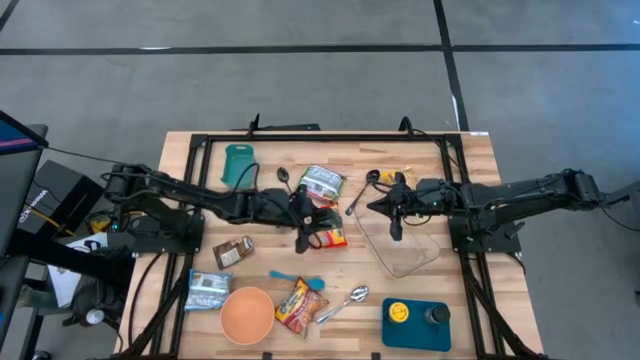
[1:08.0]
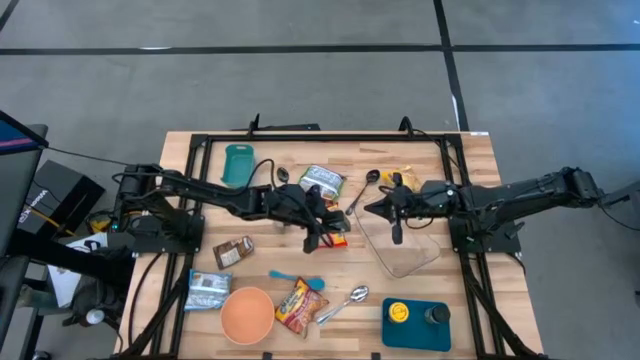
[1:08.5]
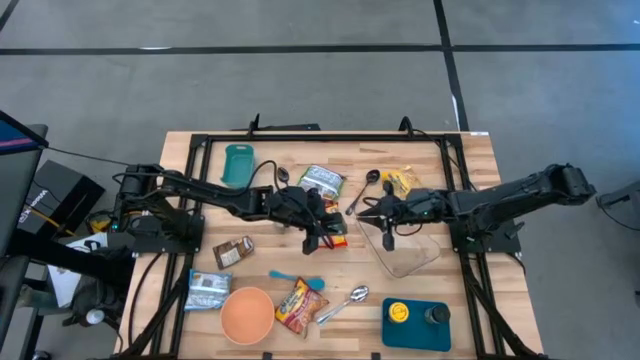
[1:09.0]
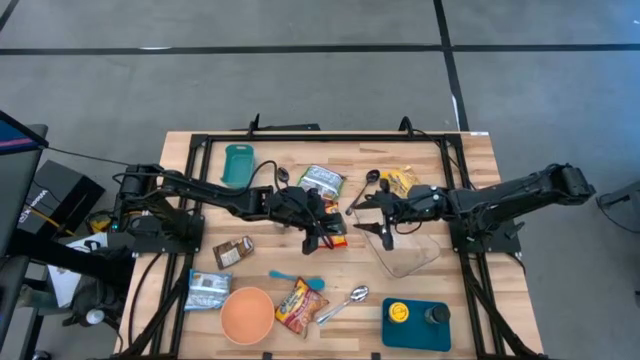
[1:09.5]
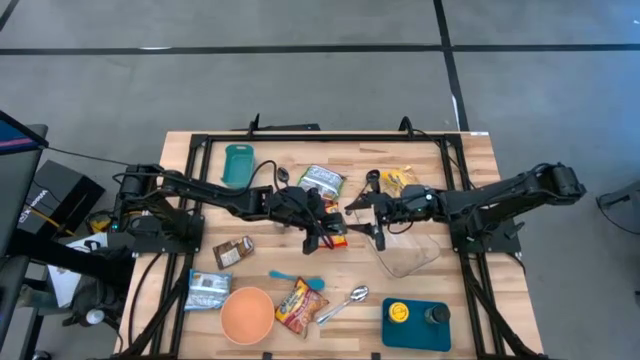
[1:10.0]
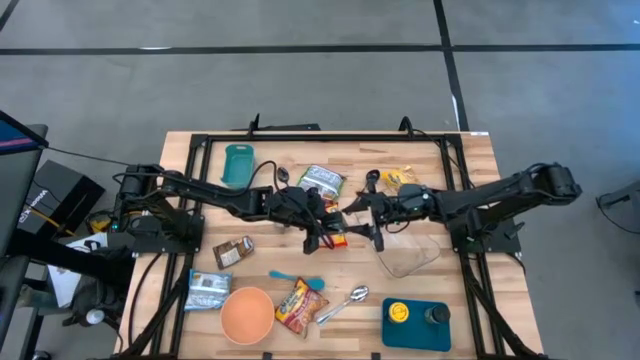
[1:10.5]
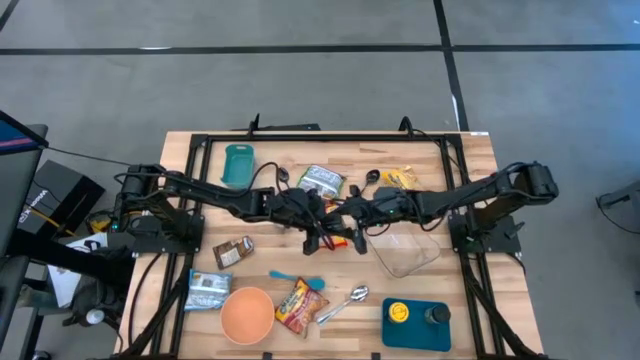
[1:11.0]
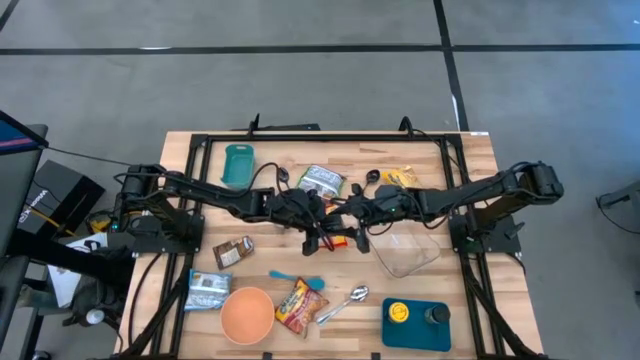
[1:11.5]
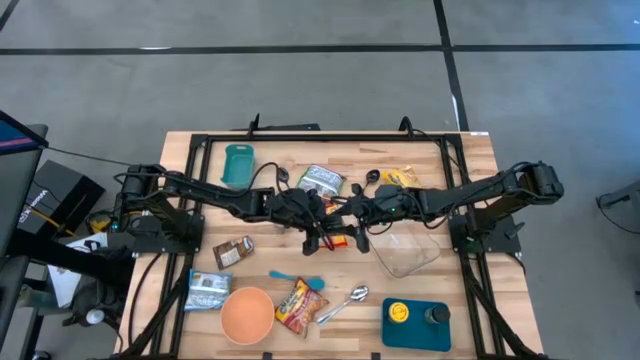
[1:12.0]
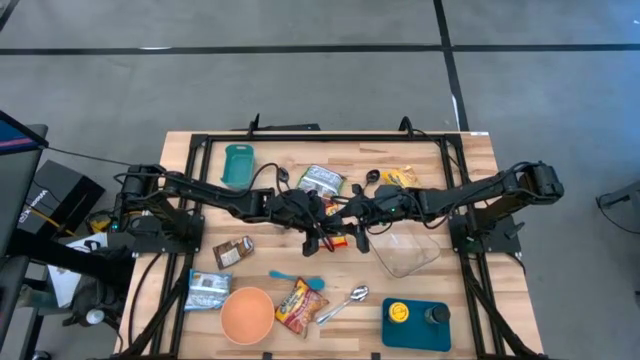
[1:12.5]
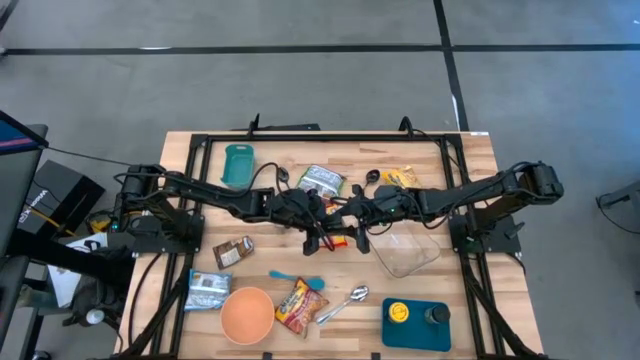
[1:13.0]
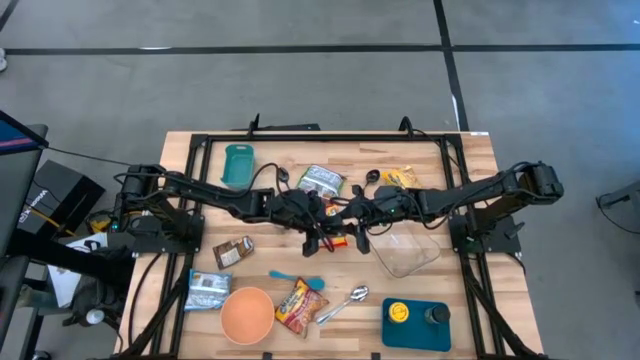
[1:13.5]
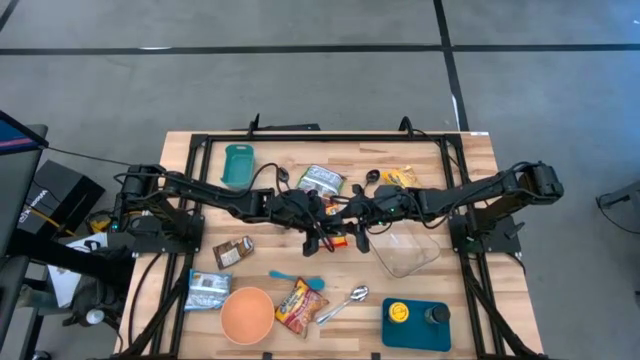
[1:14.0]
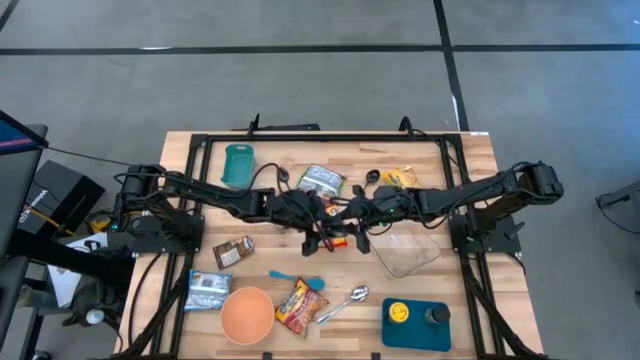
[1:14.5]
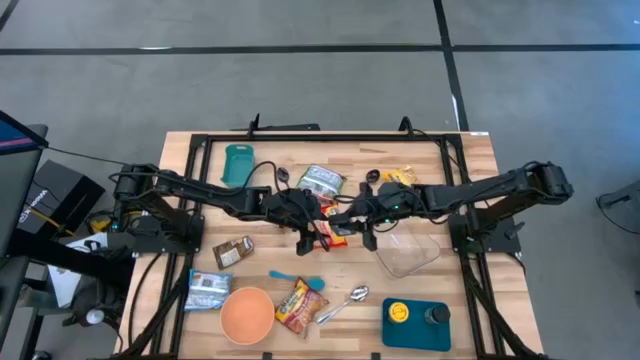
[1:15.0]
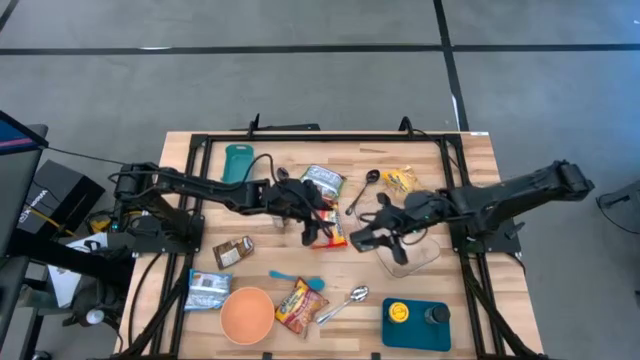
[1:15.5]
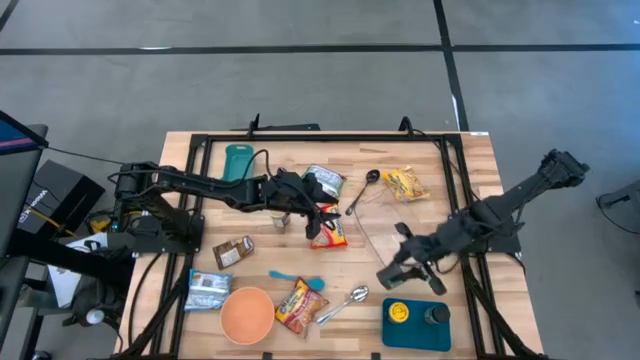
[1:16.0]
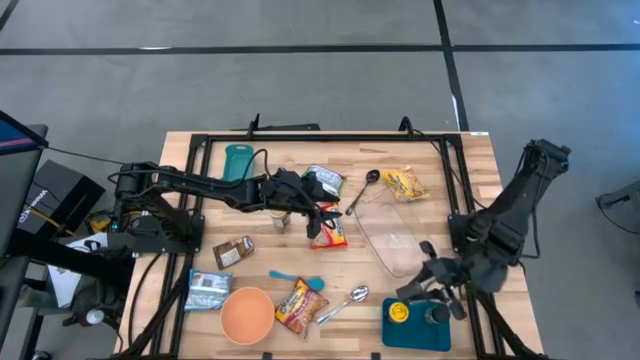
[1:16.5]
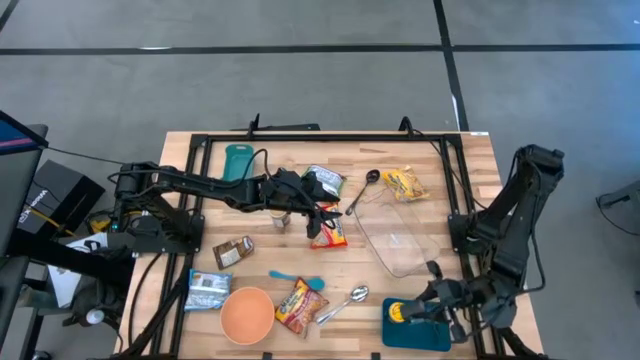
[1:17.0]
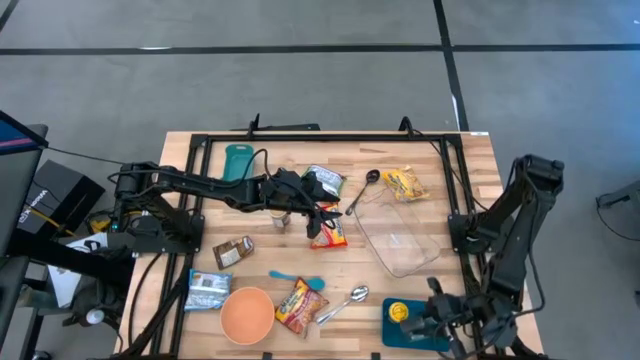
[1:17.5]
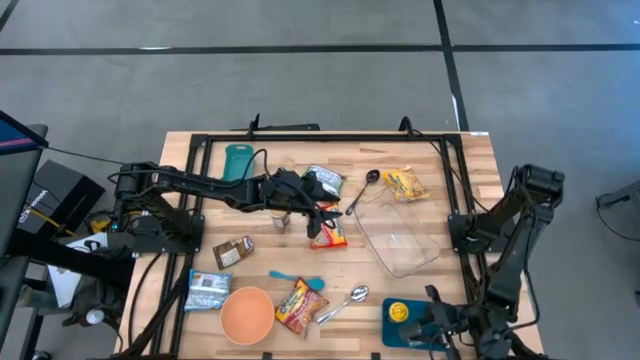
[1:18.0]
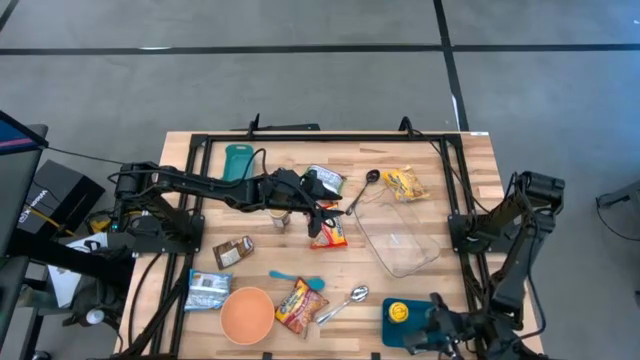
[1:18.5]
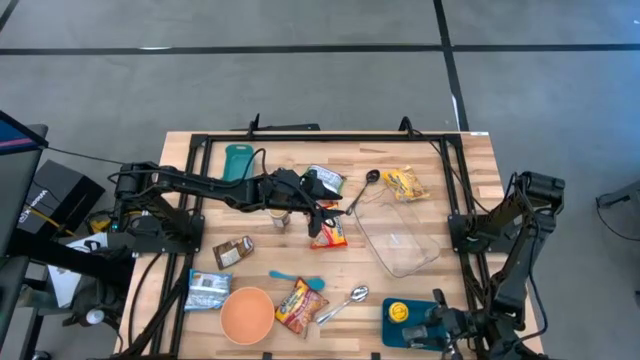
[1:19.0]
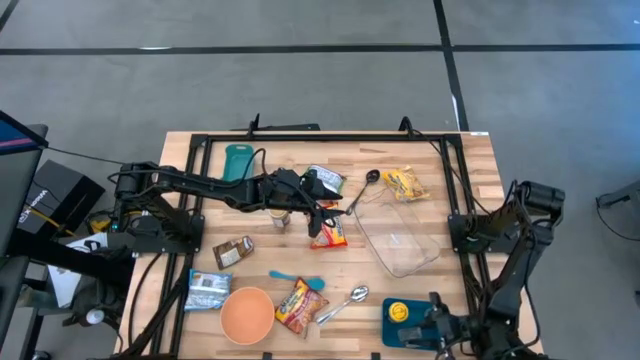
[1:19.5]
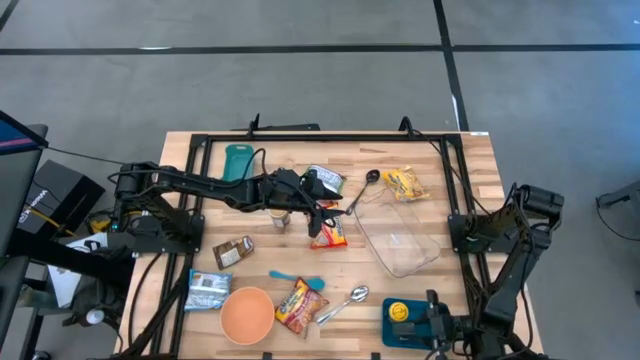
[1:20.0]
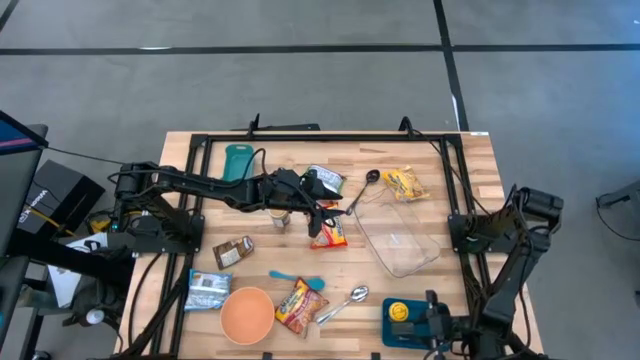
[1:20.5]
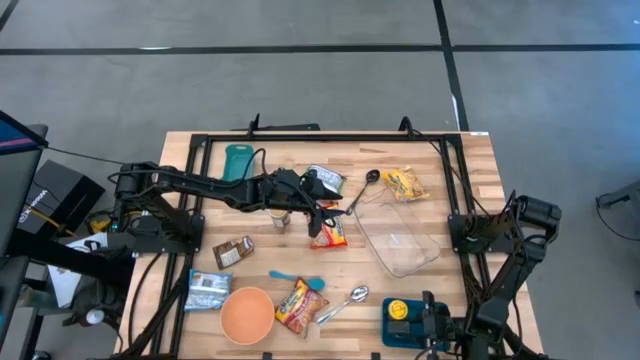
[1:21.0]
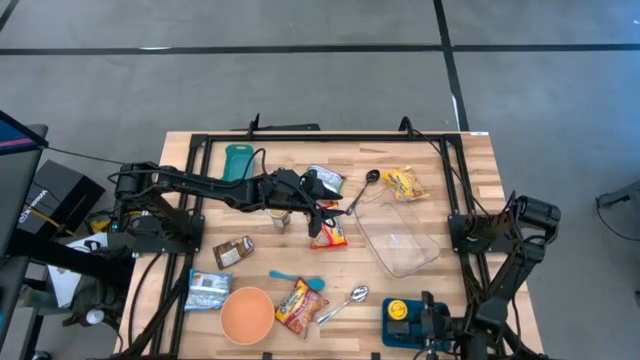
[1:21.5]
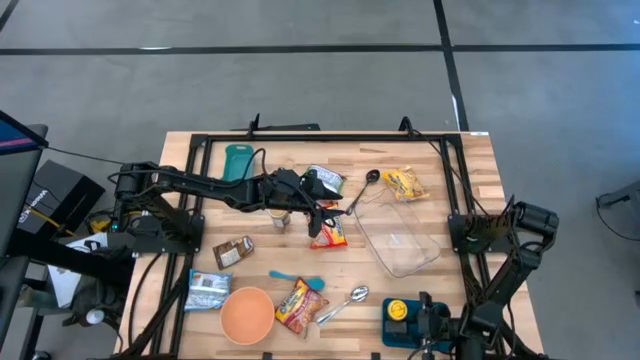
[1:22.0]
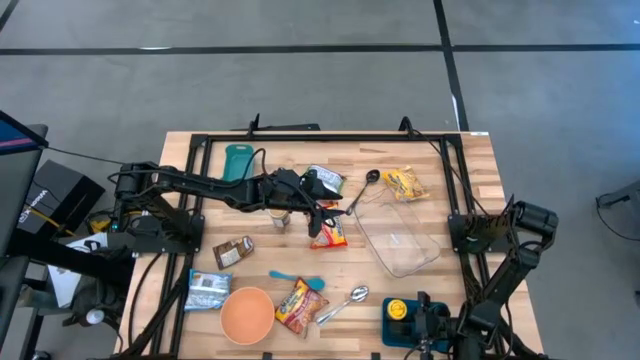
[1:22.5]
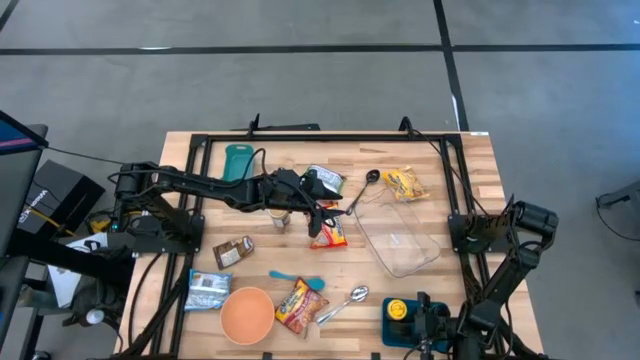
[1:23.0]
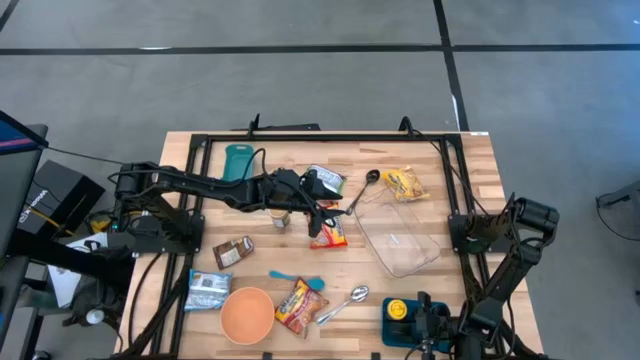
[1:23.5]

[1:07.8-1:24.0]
Task: Pick & Place Food Item
Put the black spice can into the blue bin

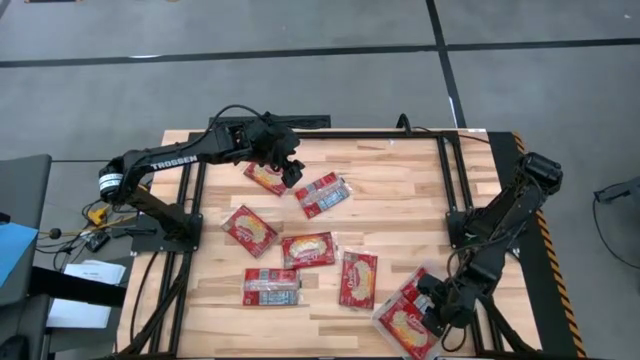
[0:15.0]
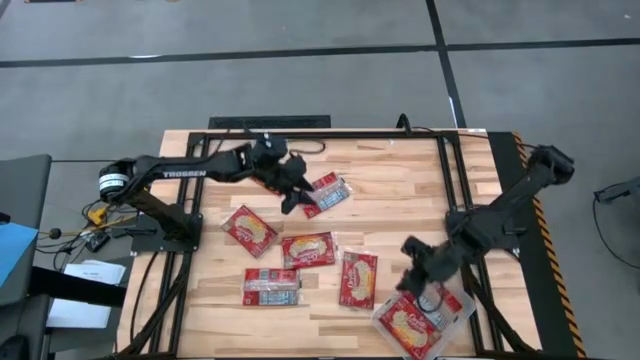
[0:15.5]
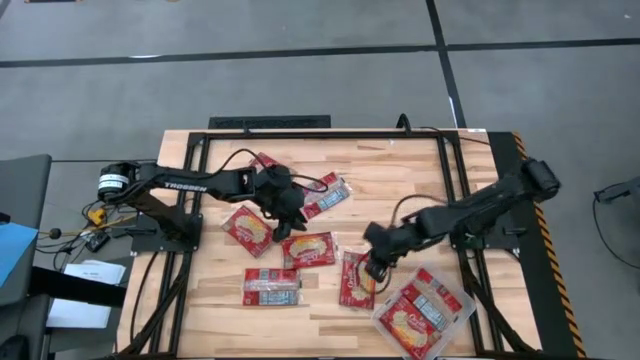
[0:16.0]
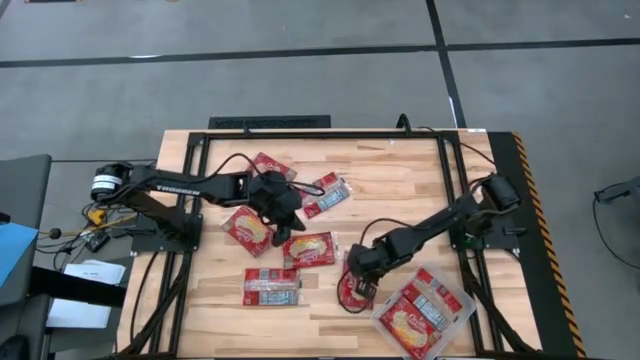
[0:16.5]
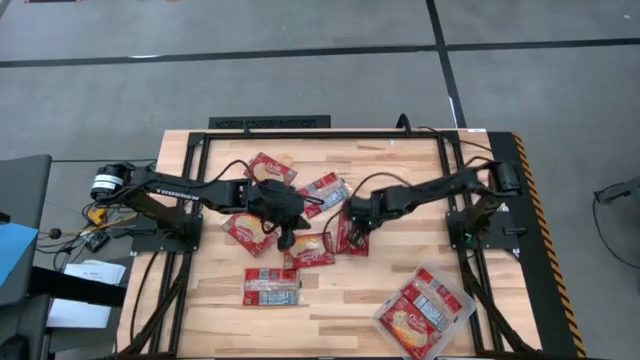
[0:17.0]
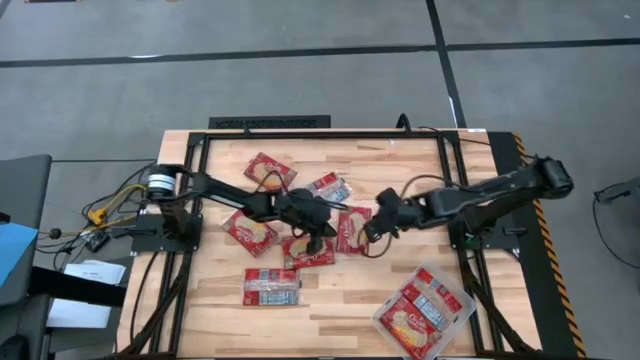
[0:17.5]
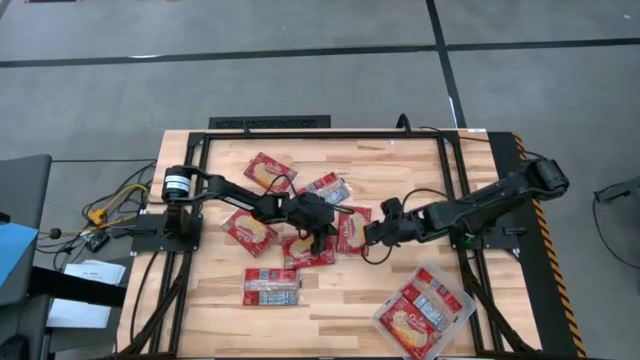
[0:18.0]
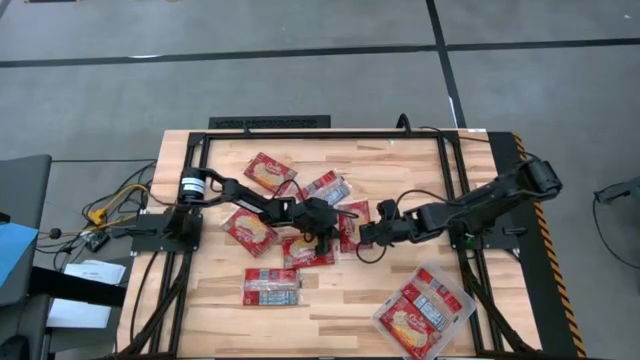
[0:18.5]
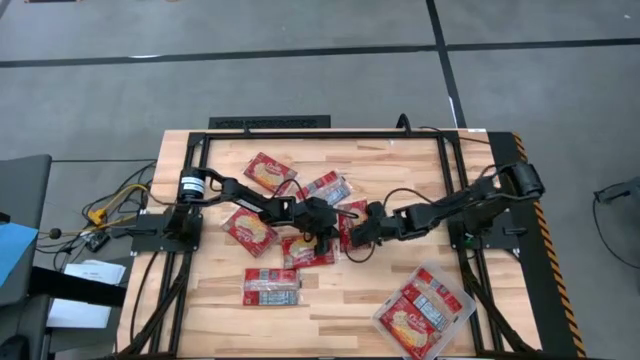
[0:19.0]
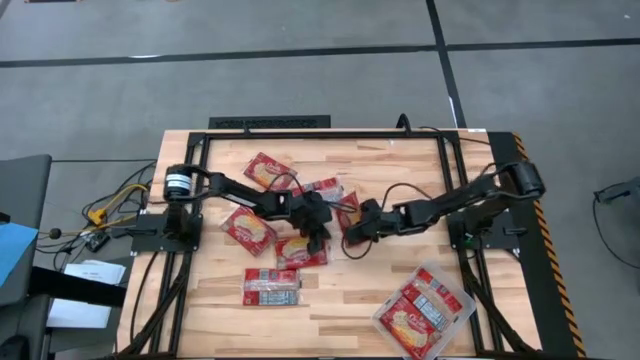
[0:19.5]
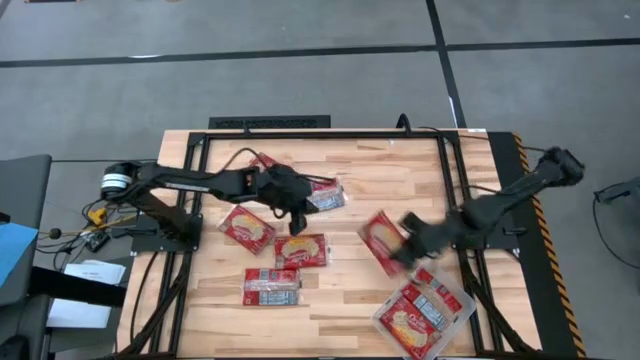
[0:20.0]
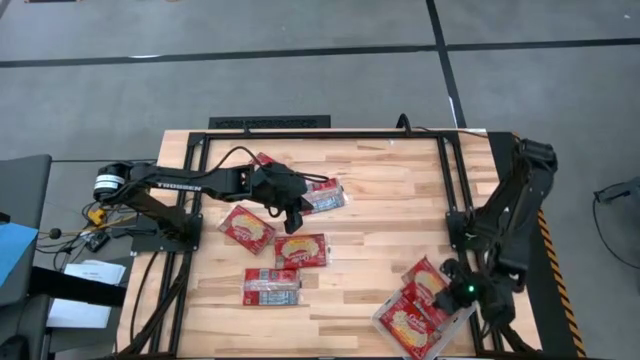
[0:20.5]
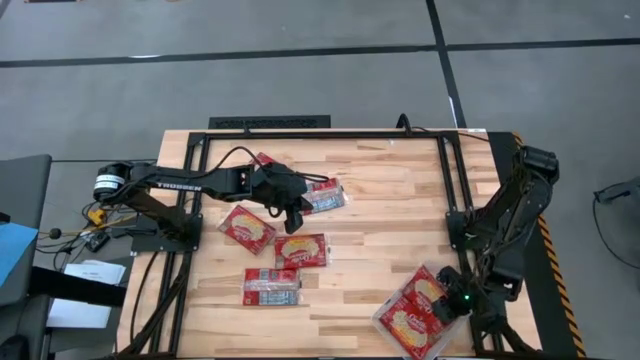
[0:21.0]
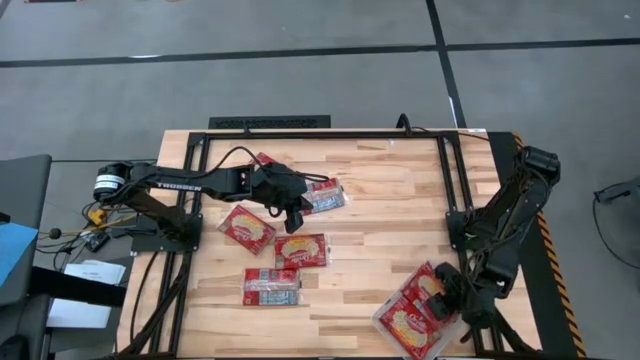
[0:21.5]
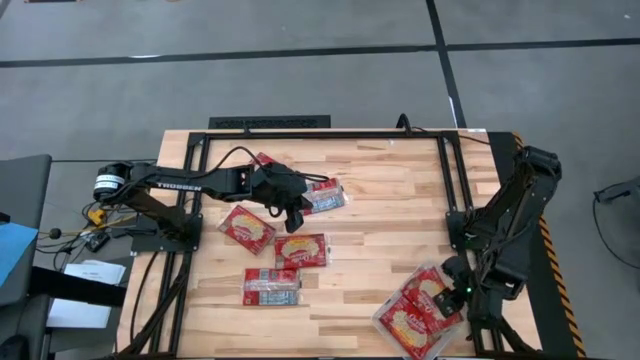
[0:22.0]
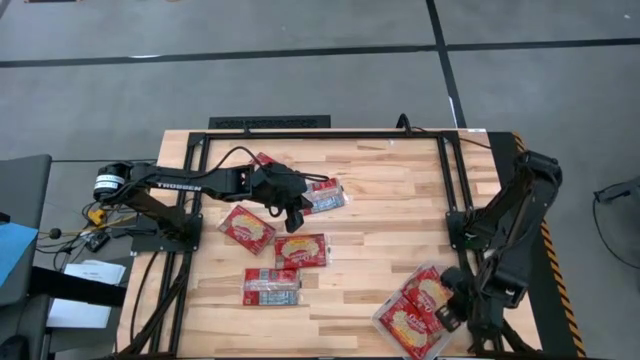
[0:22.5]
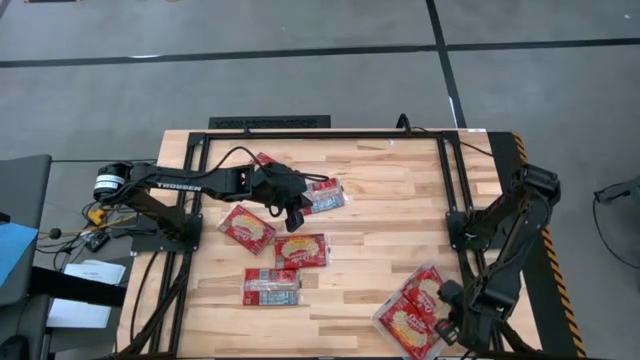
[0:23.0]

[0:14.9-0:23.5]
Task: Sort popcorn bags into baskets
Put the red popcorn bag into the transparent bin
